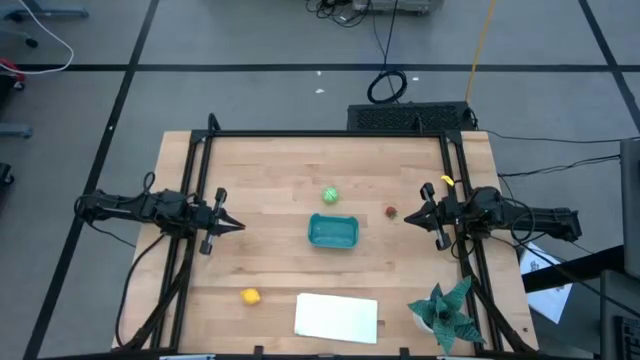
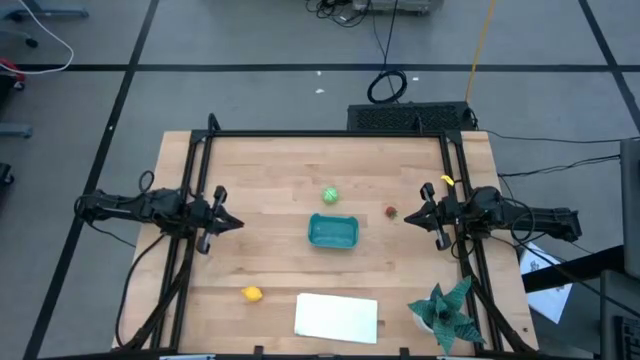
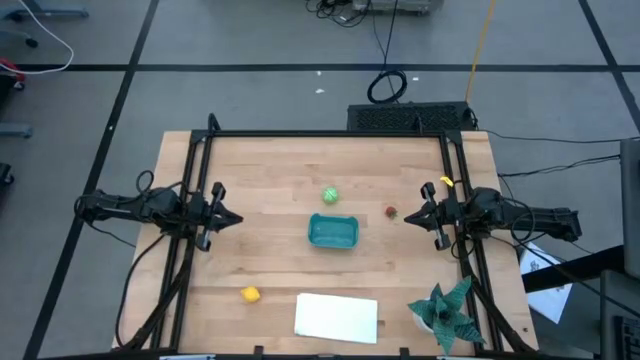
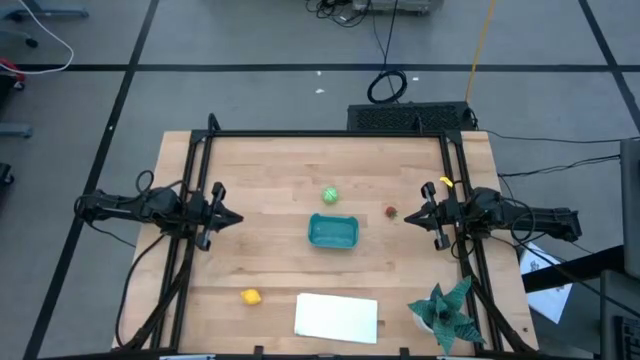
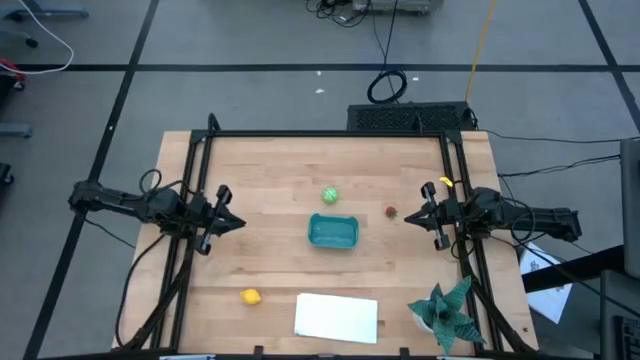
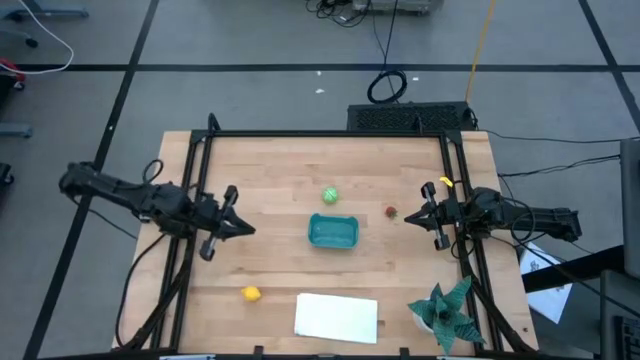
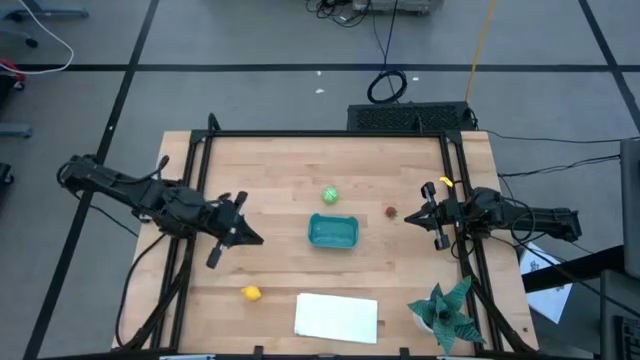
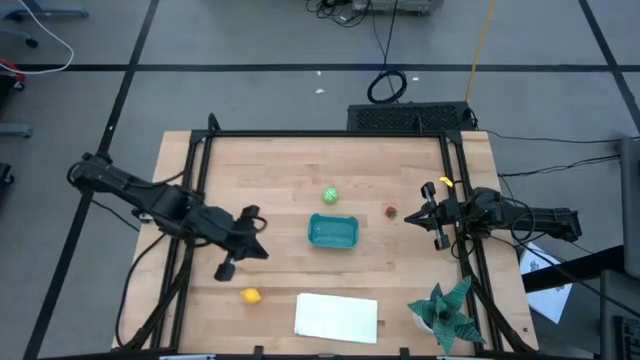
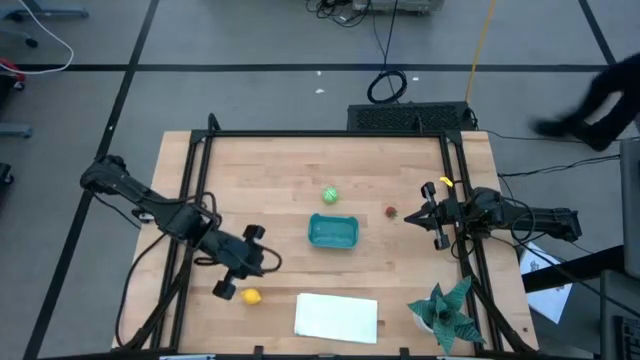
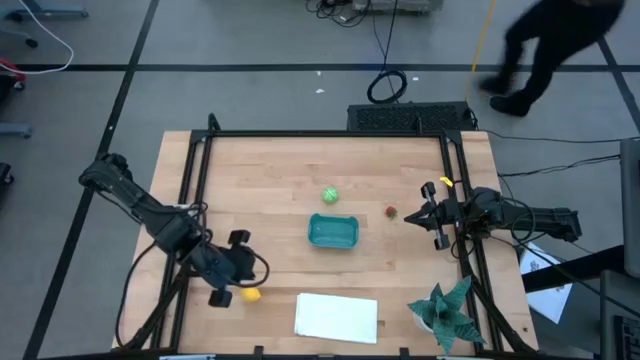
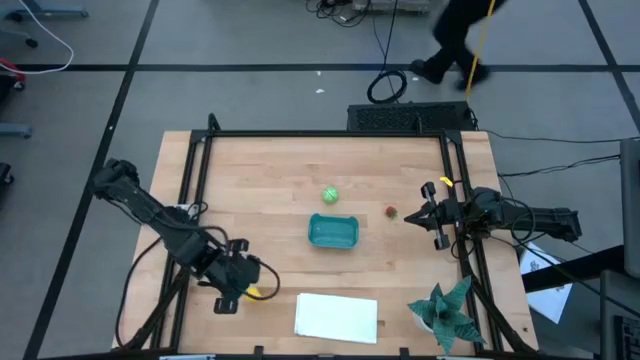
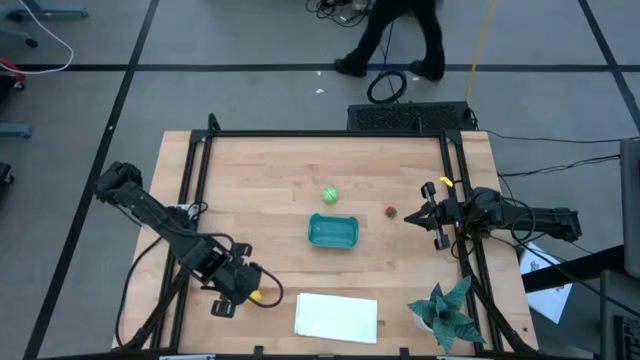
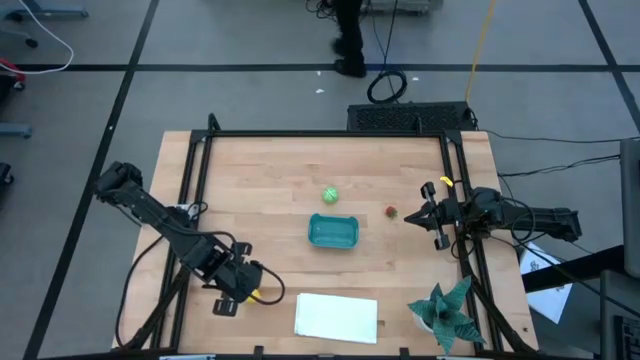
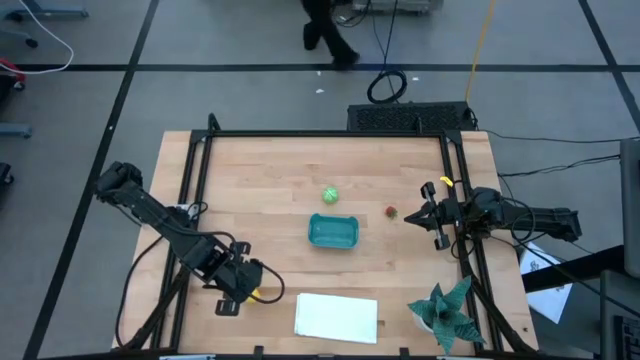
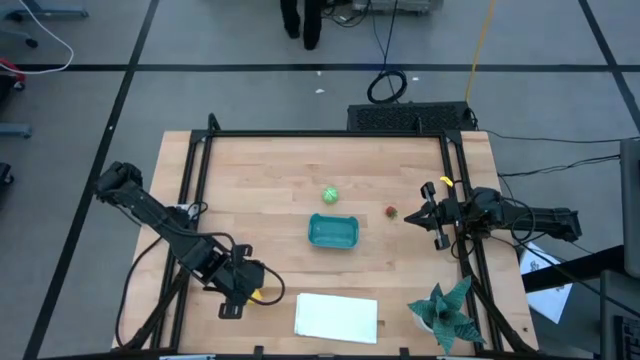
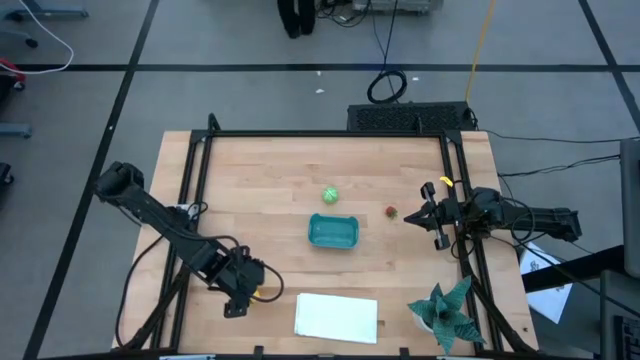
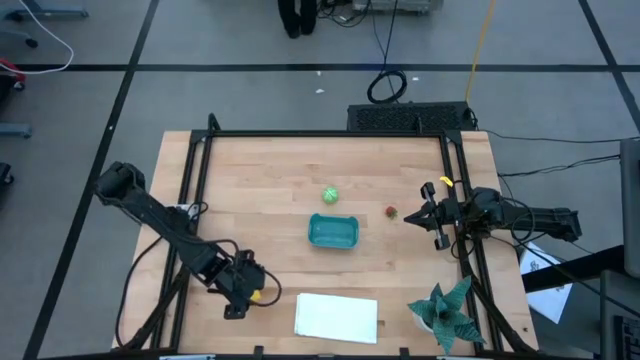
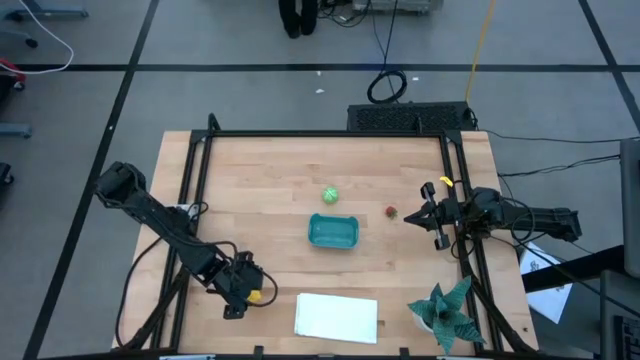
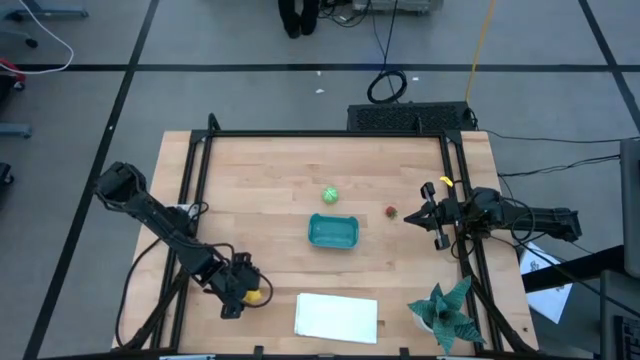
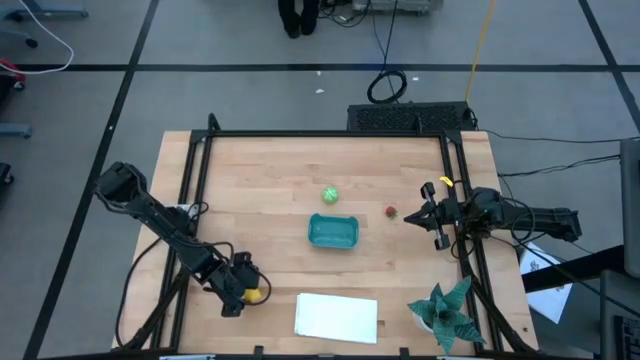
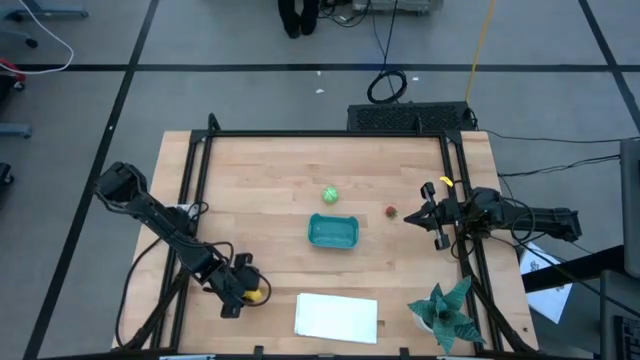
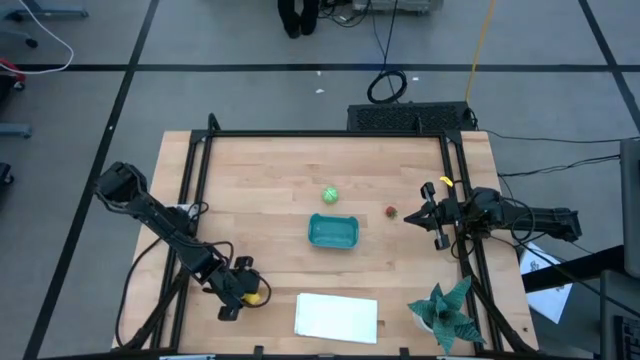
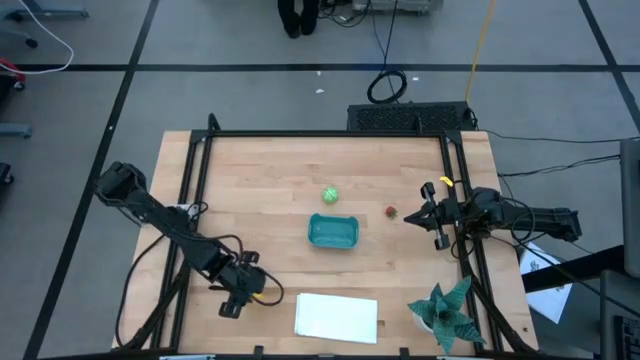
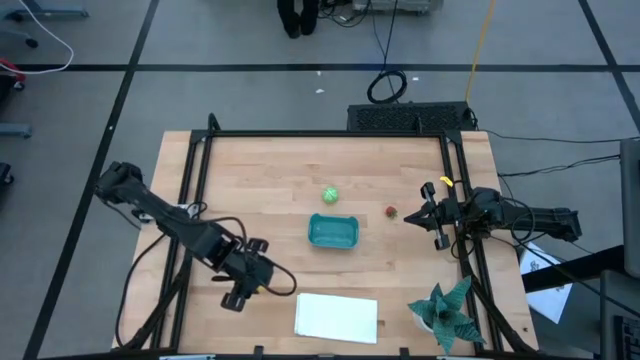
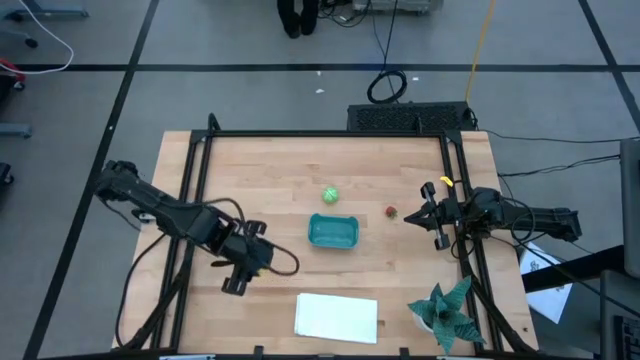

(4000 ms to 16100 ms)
Task: Pick and placing Produce into tupperware
Put the yellow lemon into the blue bin

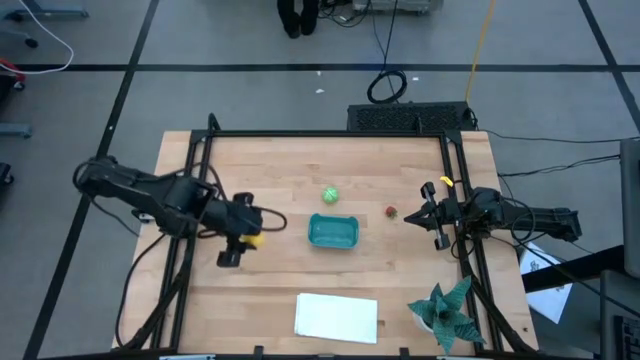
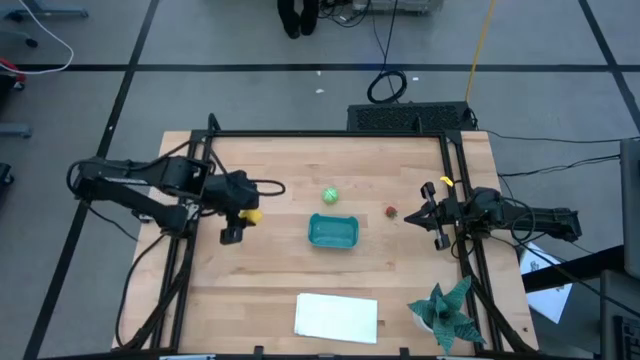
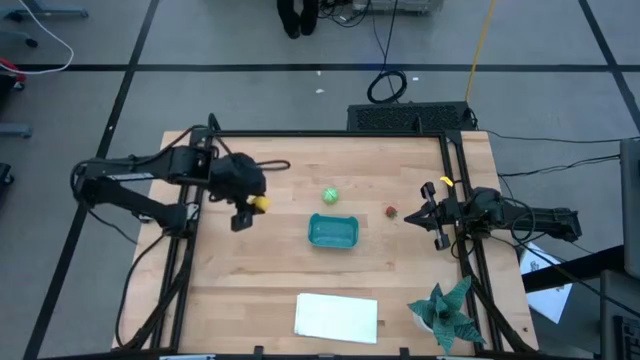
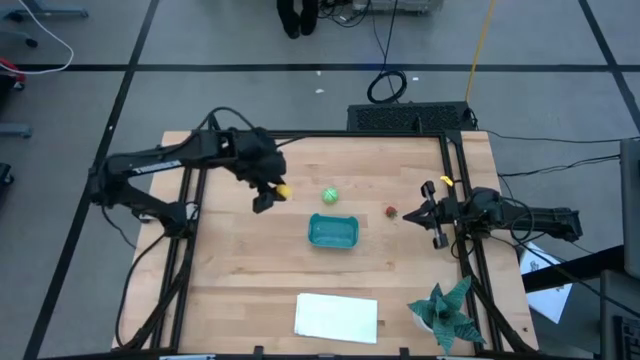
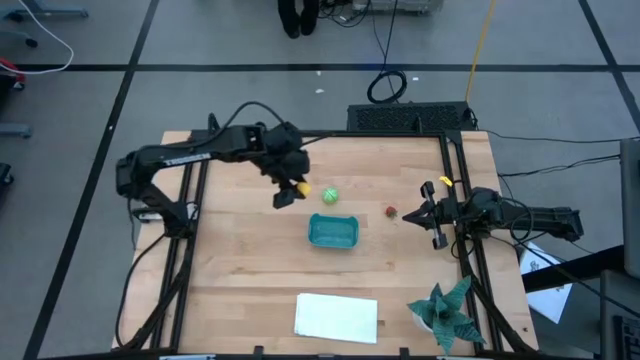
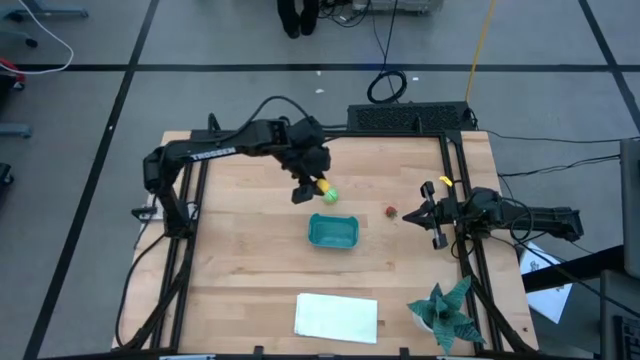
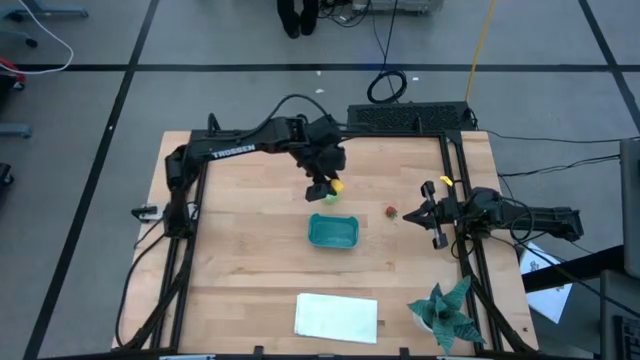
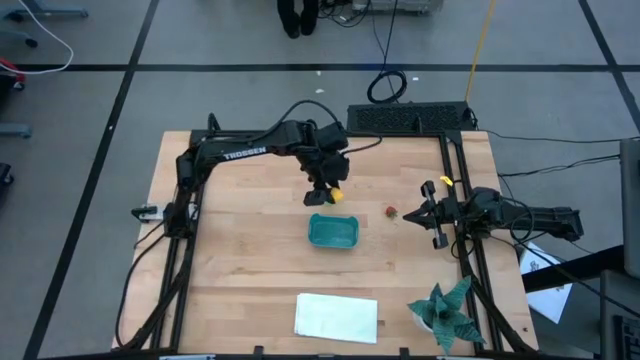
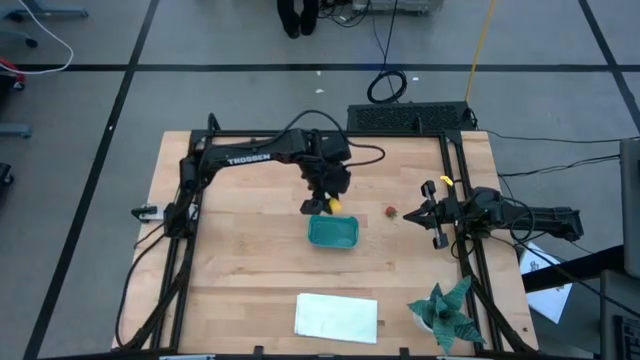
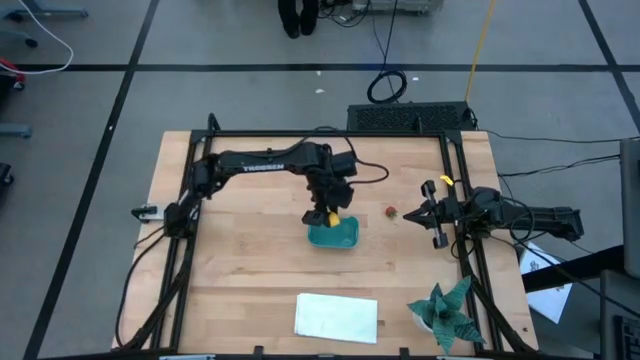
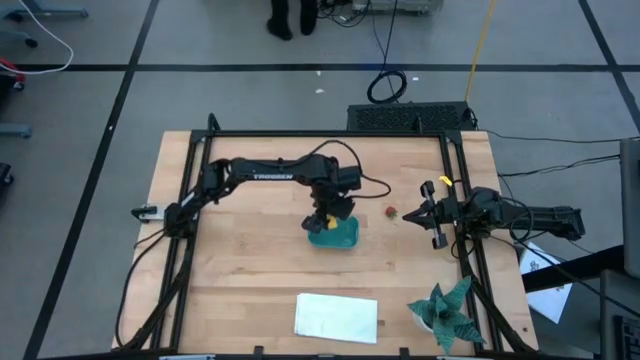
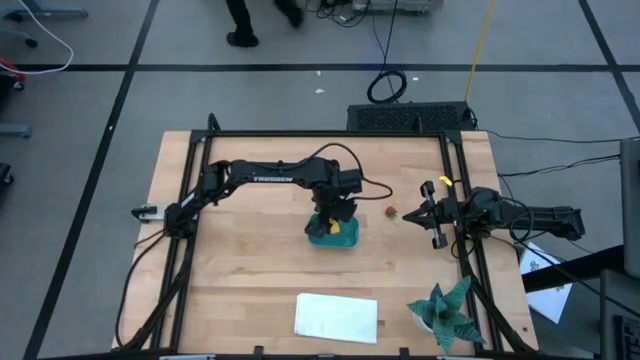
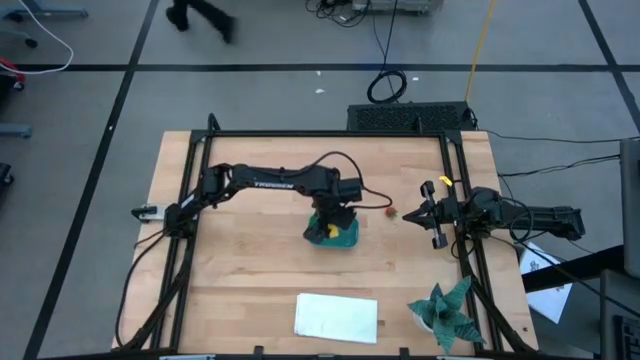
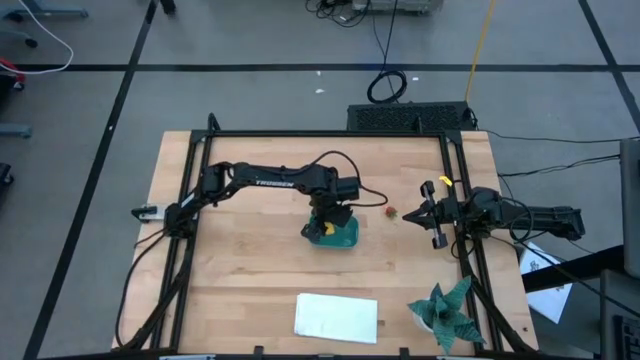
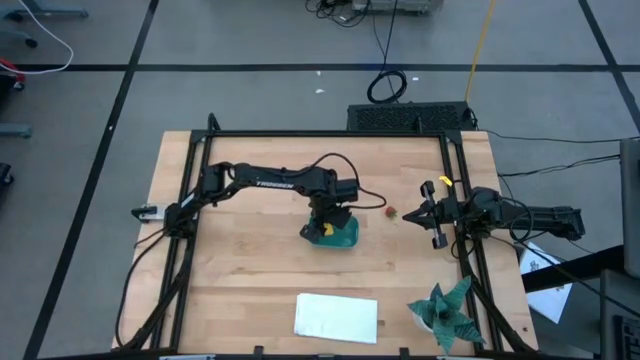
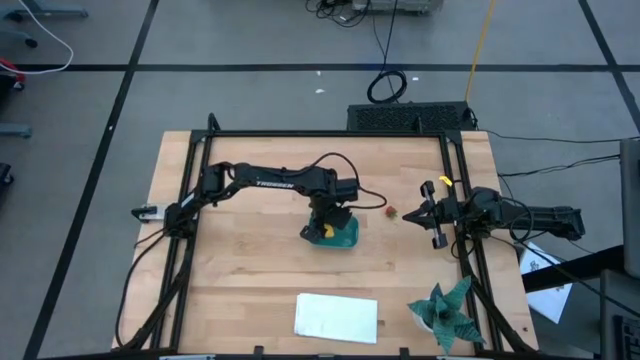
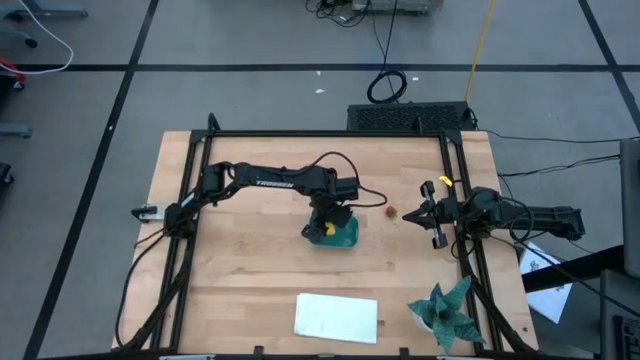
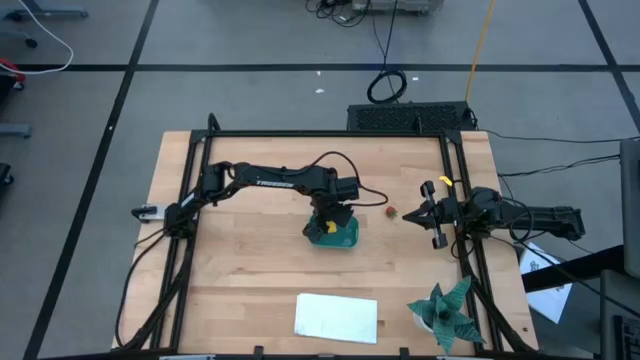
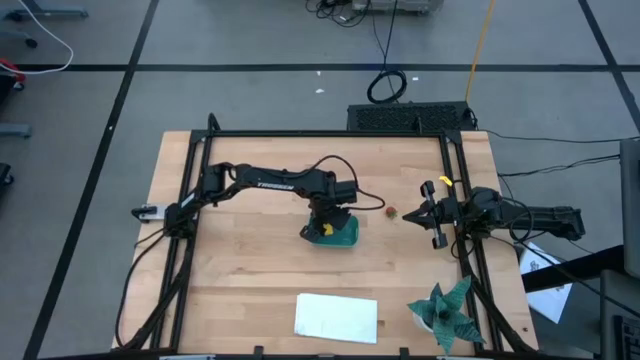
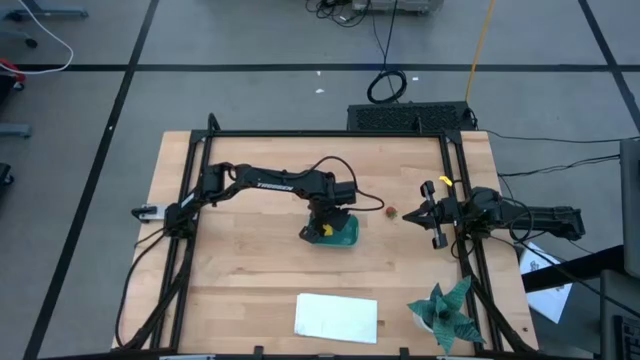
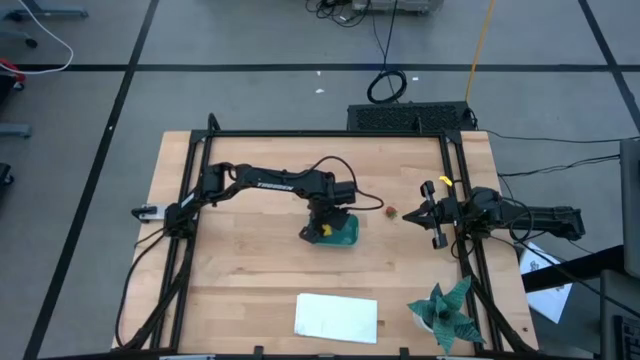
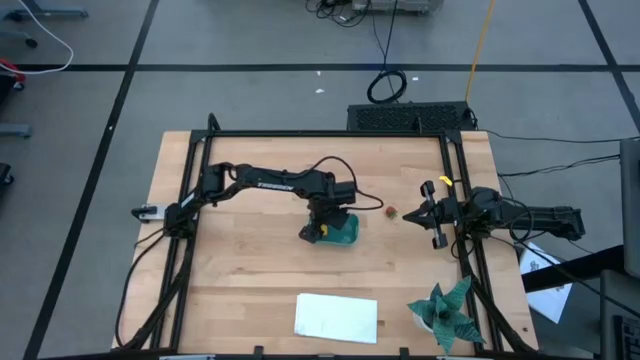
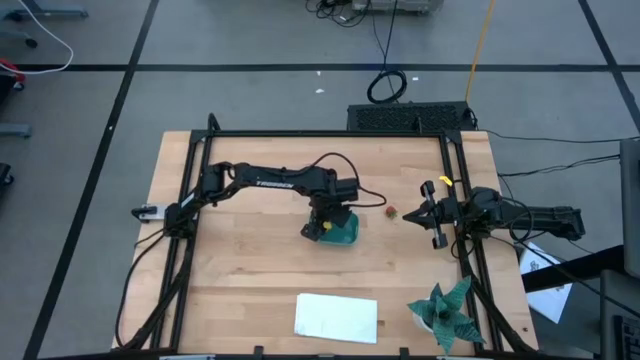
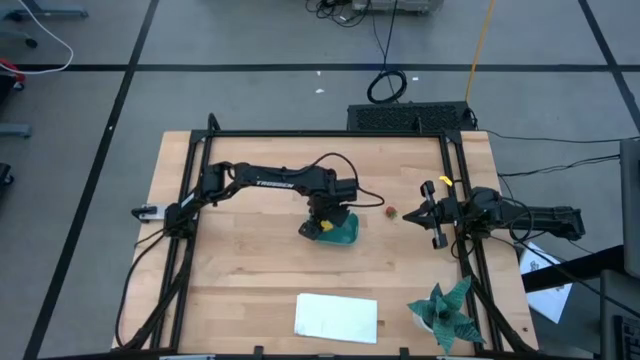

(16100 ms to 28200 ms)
Put the yellow lemon into the blue bin
